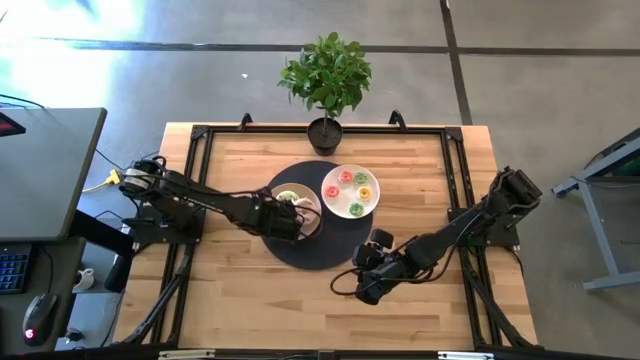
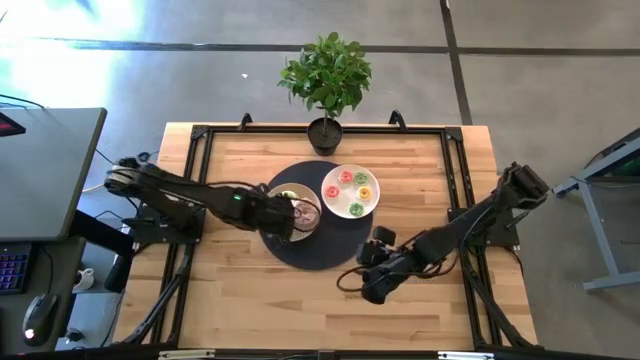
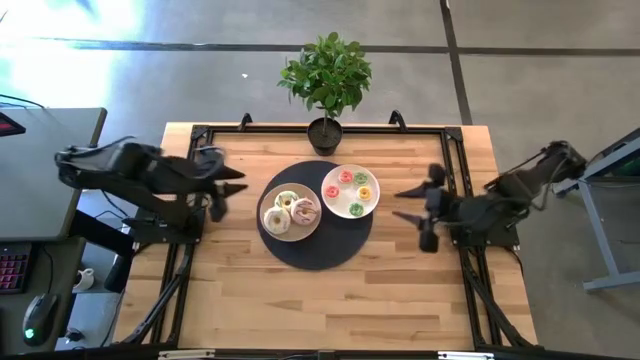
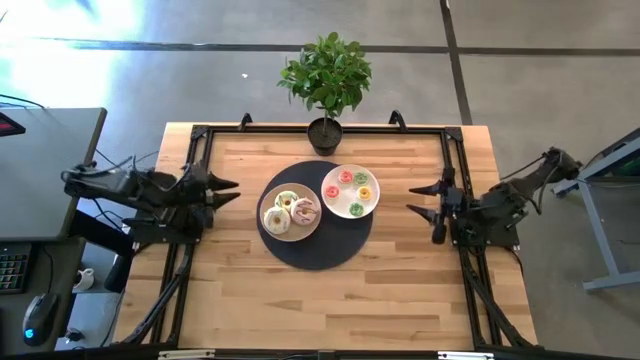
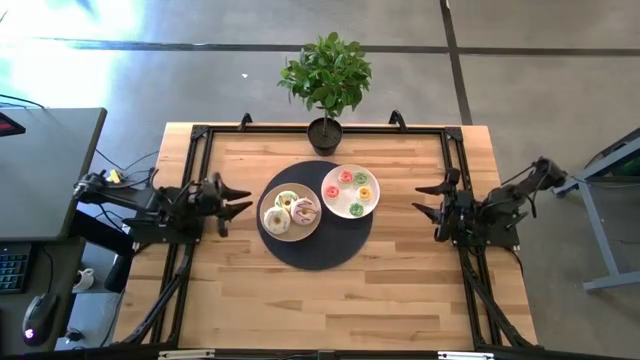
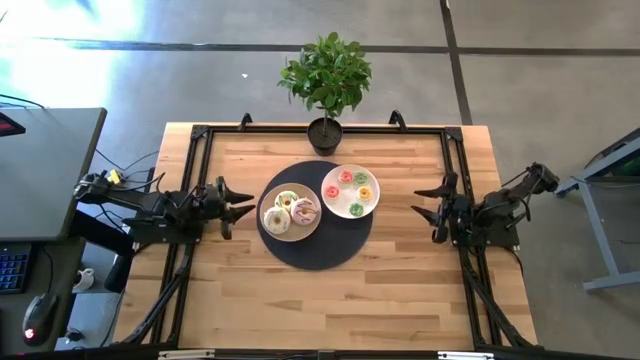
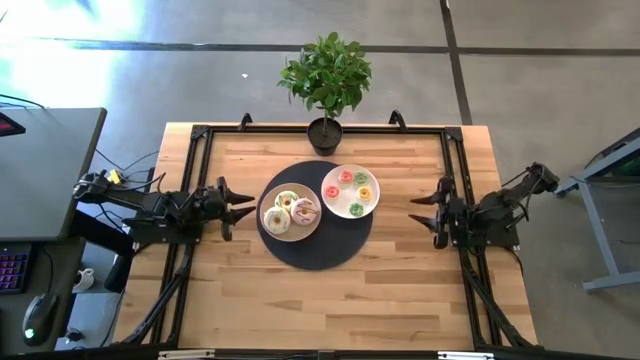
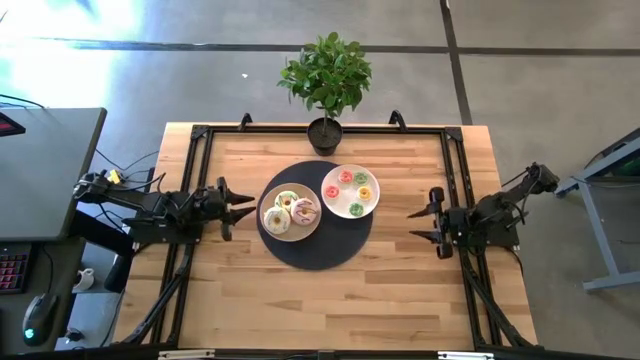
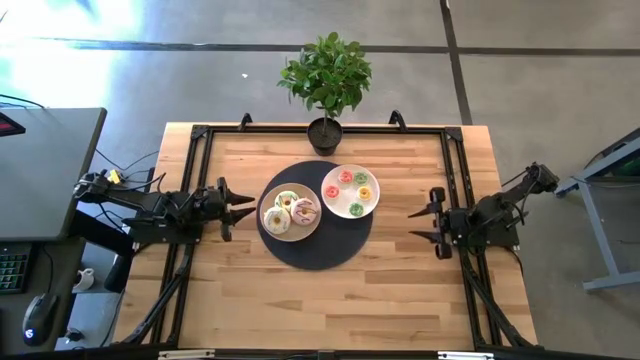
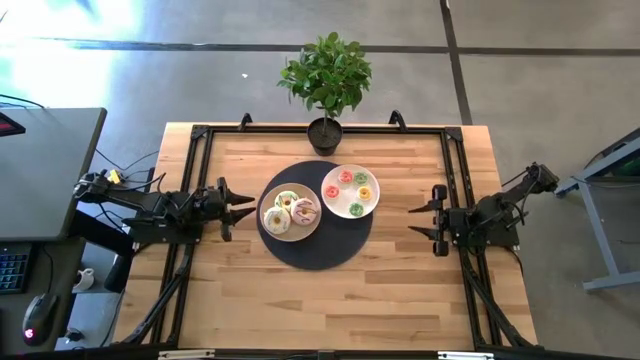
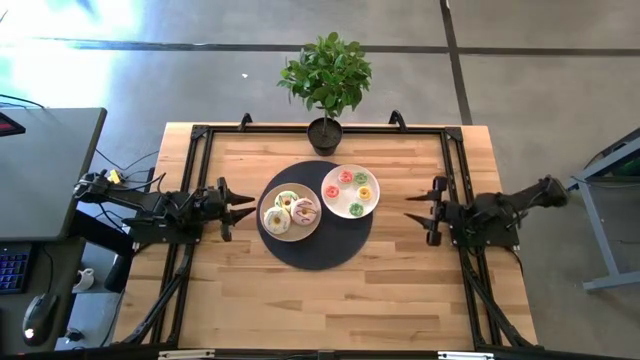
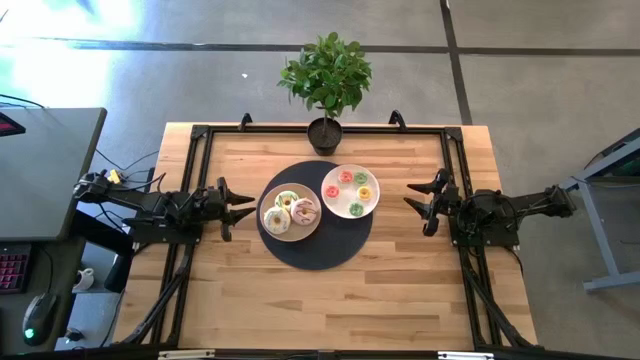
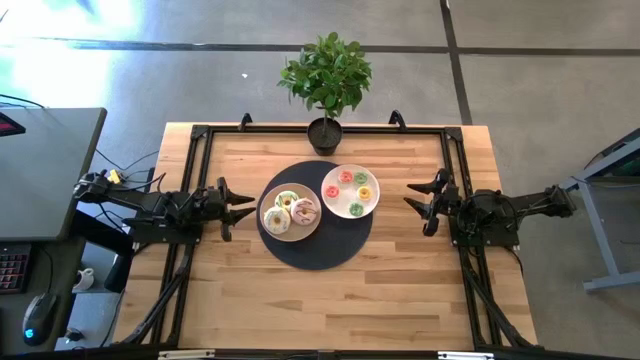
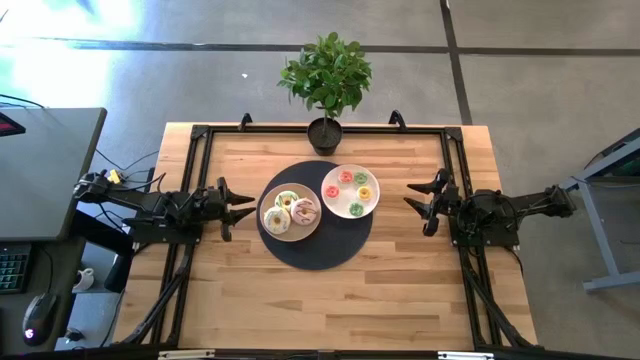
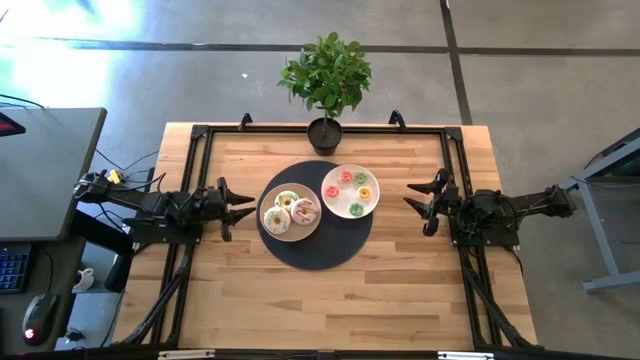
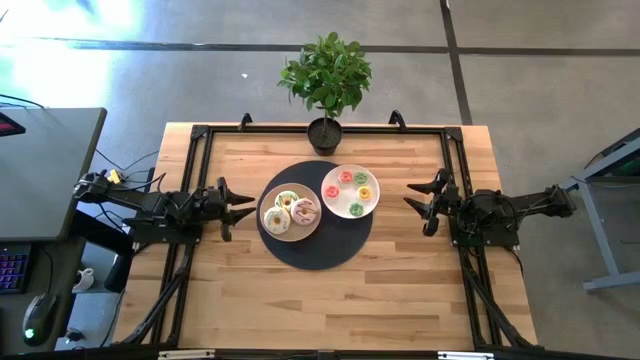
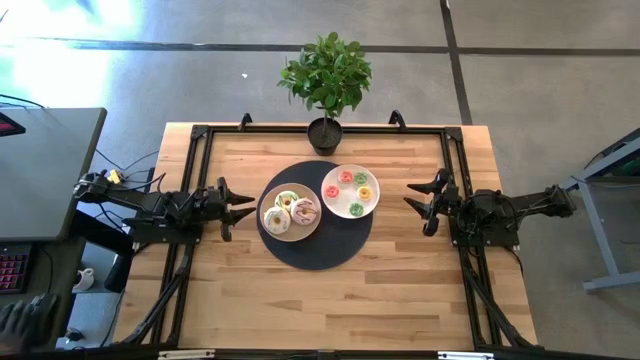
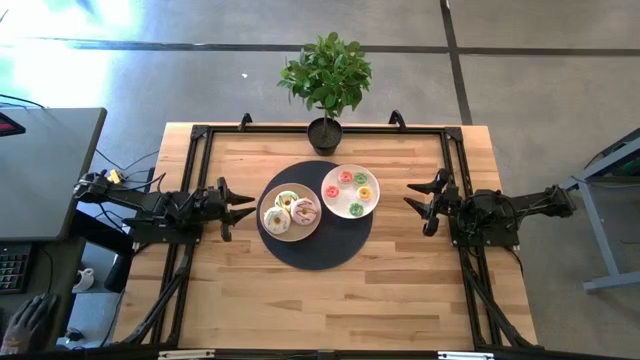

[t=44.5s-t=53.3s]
Task: Pick & Place donuts
Return to Home Position

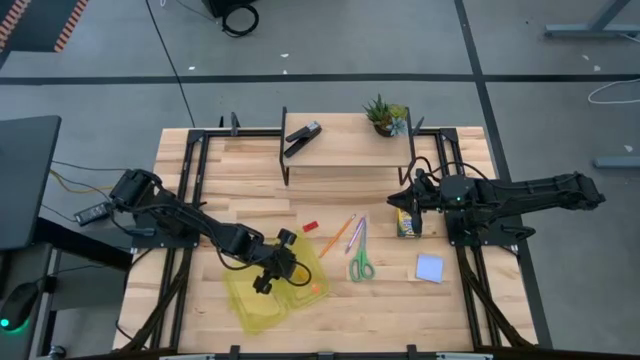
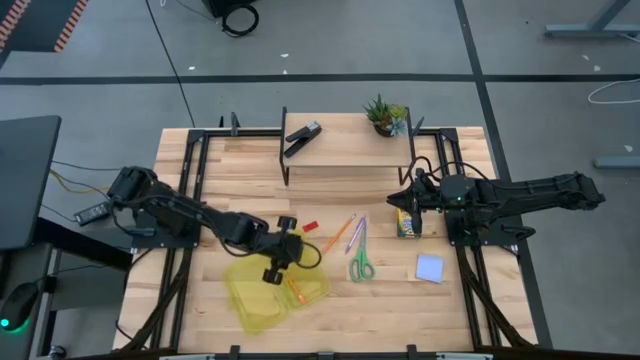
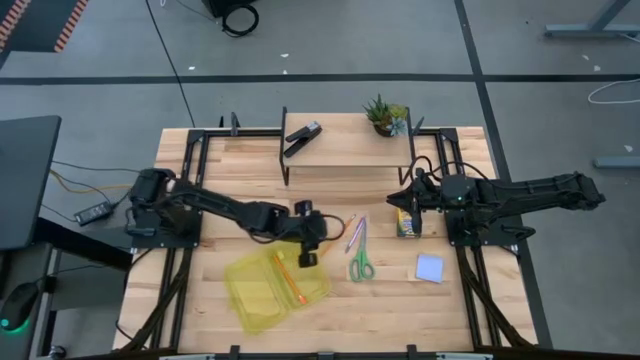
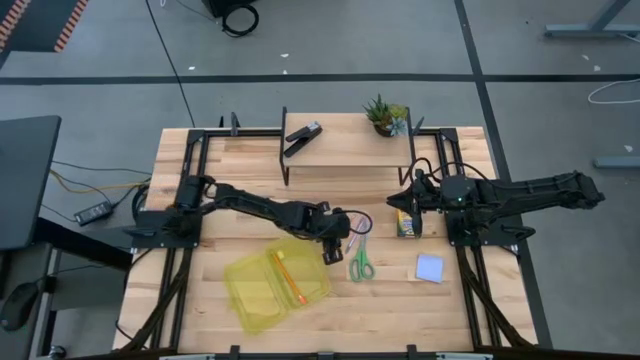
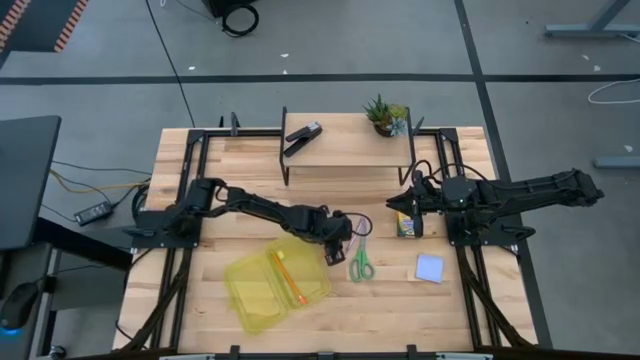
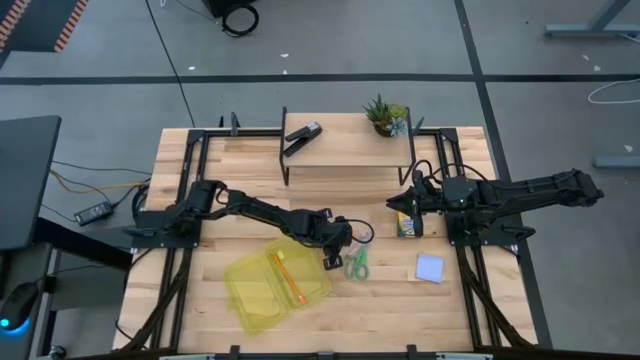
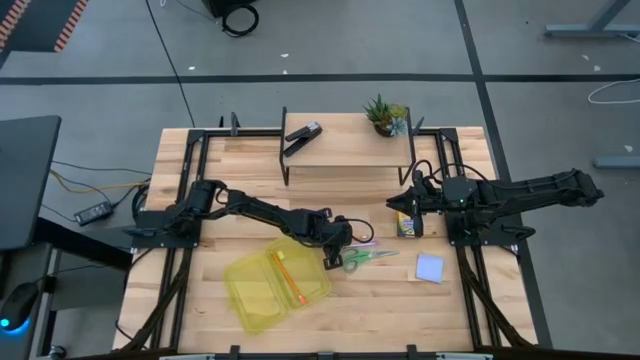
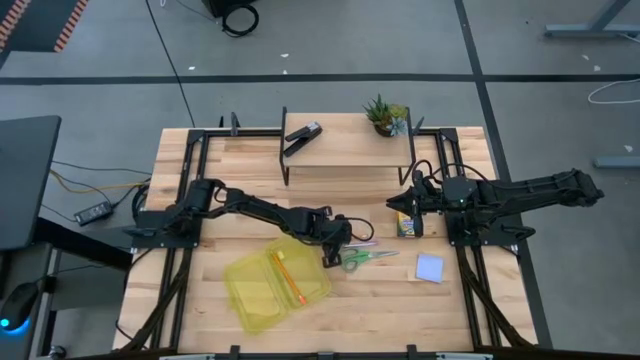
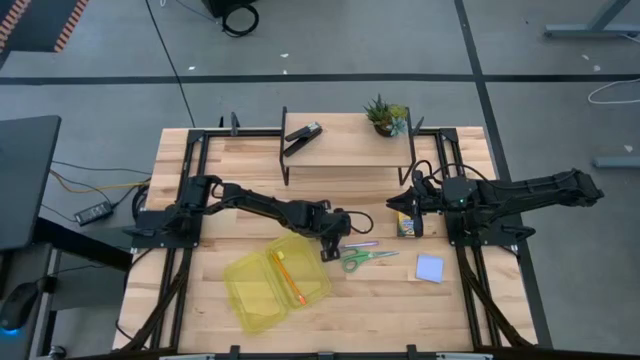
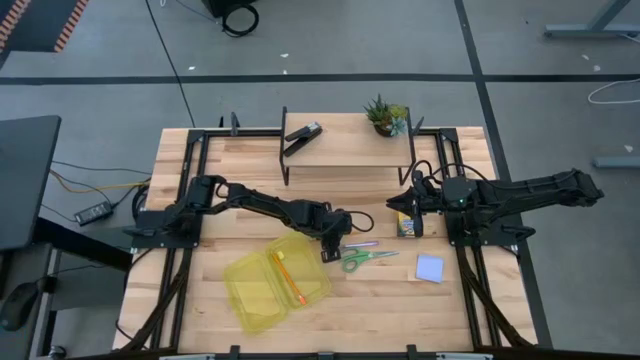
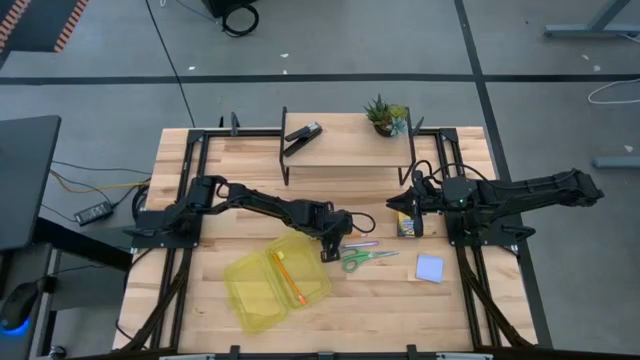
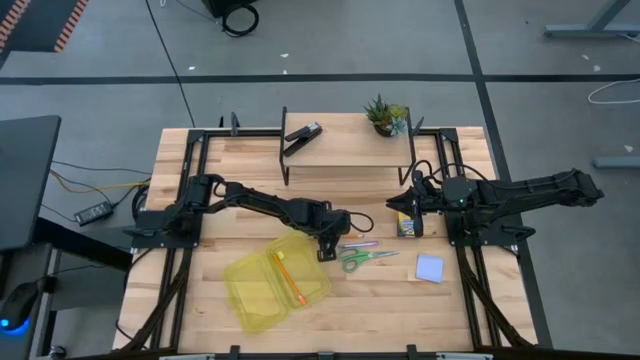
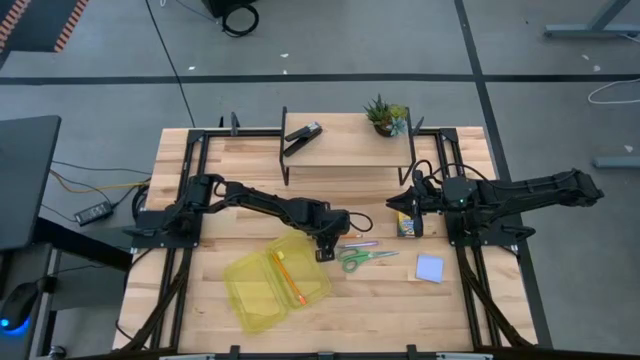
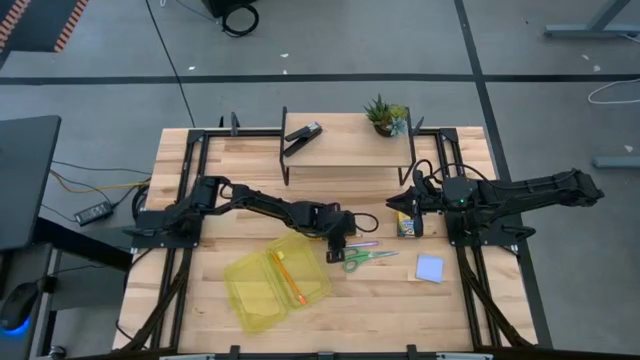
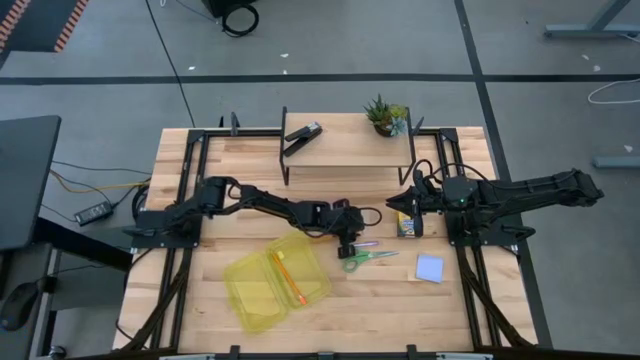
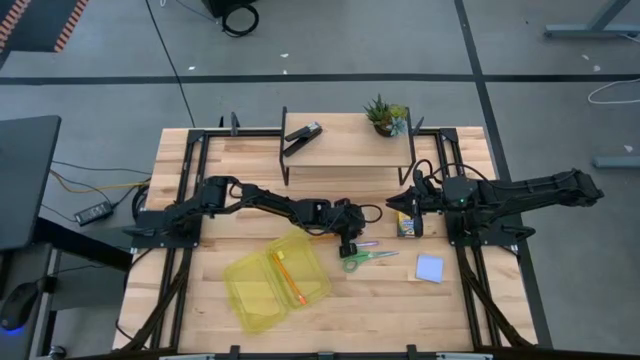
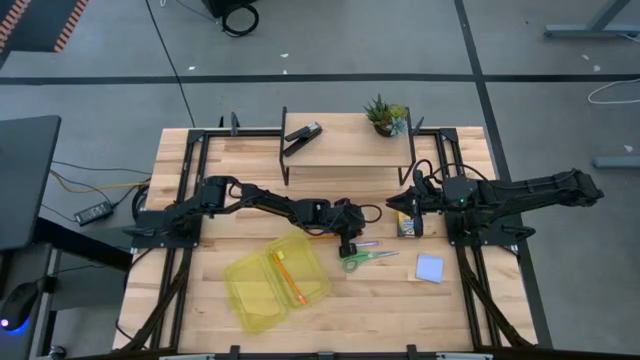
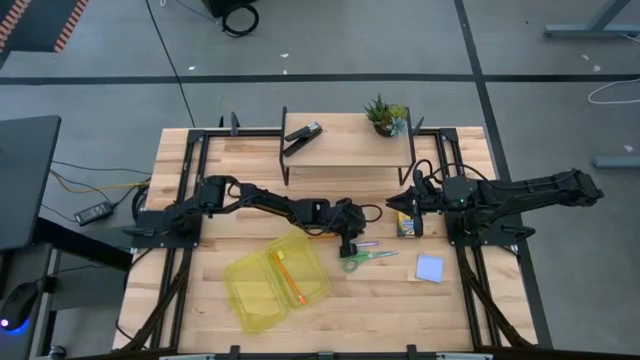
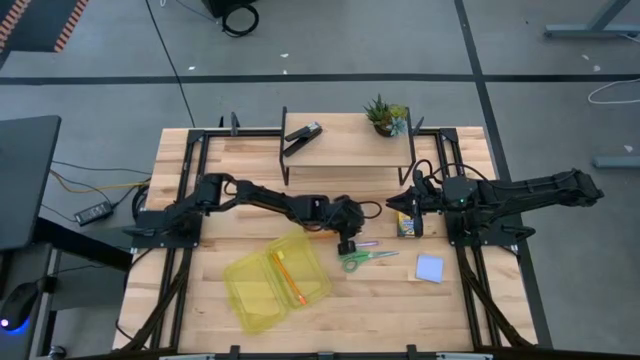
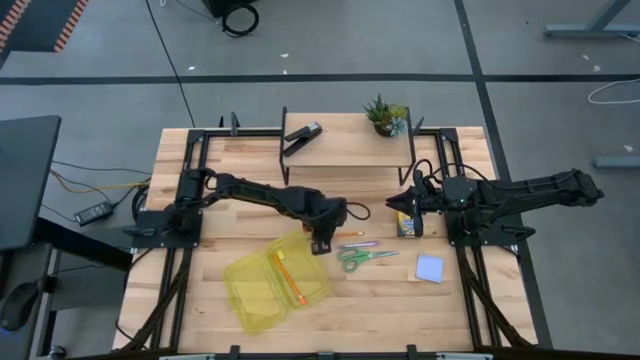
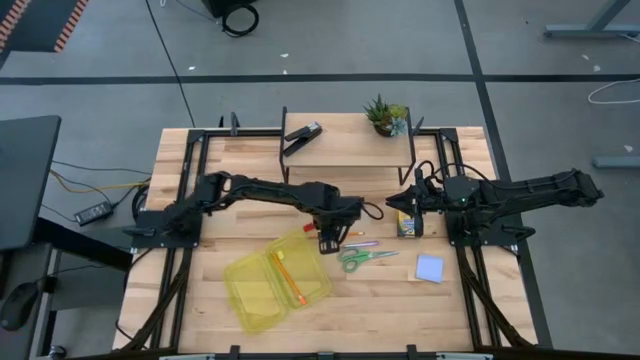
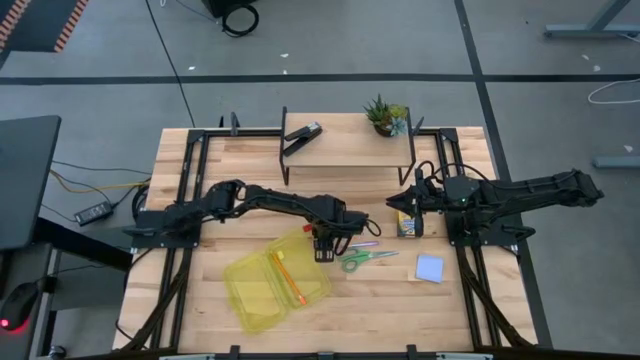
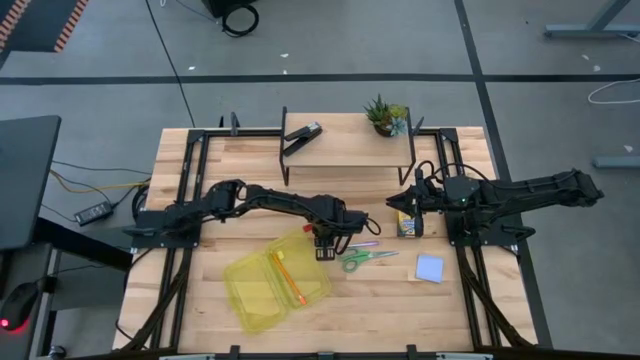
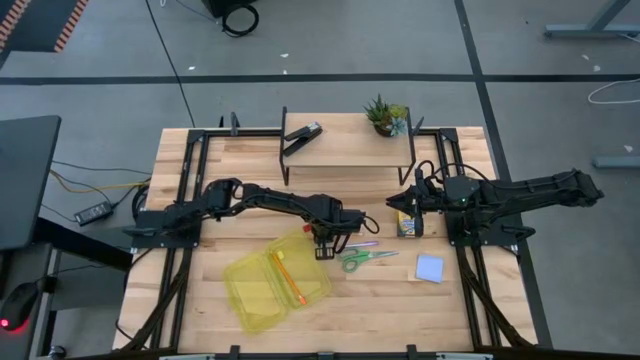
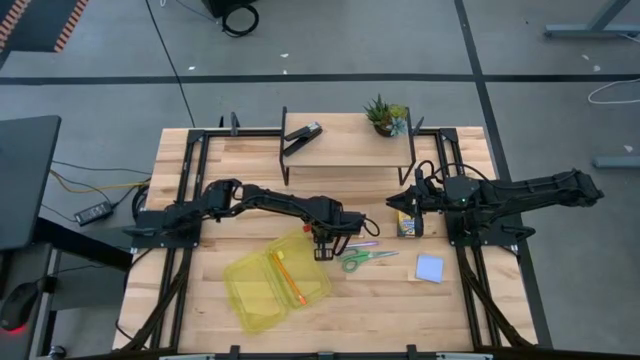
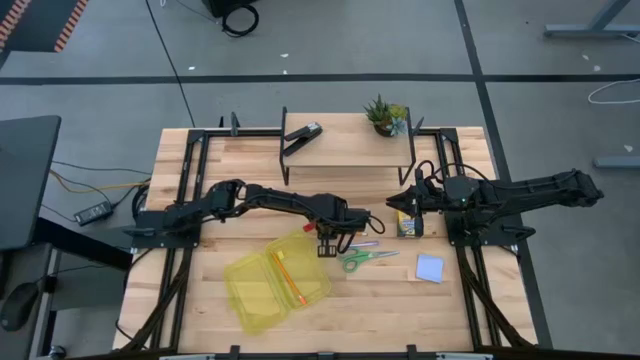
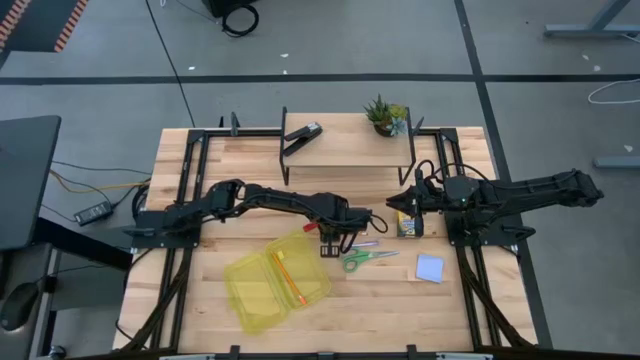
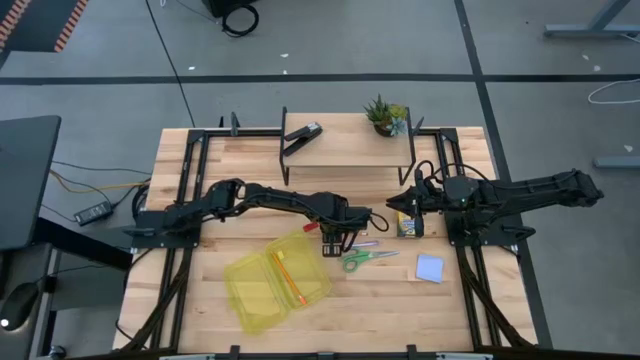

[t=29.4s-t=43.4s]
Task: Pack school essentials
Put the orange pencil into the supply box
